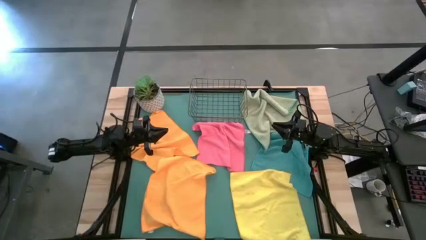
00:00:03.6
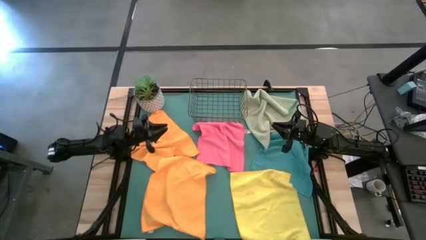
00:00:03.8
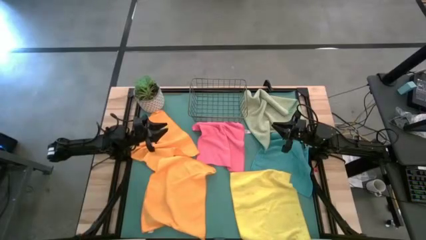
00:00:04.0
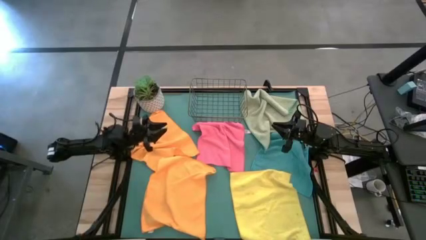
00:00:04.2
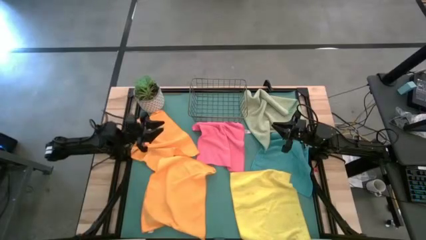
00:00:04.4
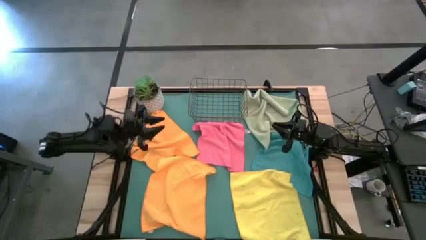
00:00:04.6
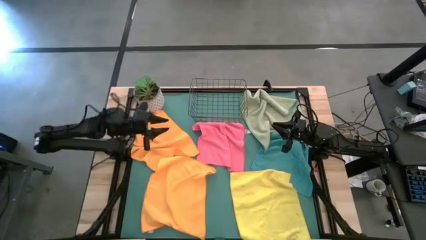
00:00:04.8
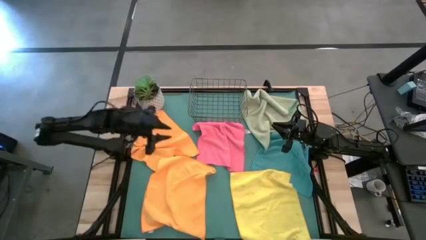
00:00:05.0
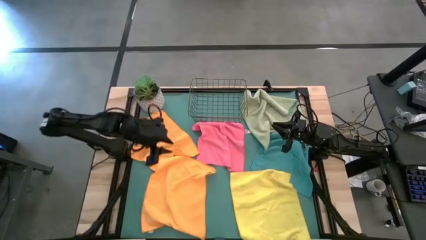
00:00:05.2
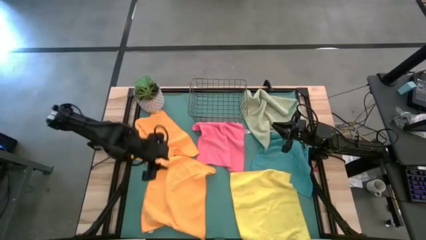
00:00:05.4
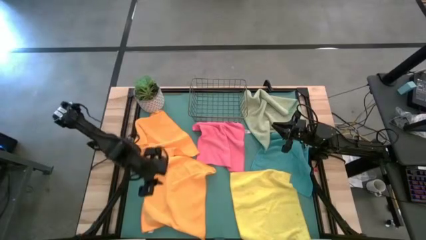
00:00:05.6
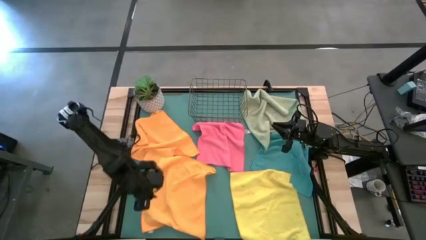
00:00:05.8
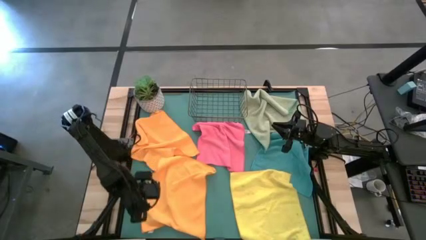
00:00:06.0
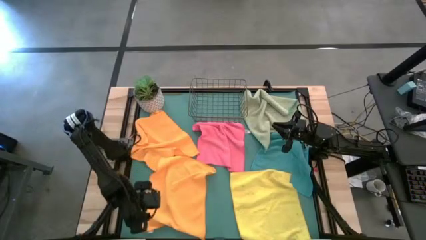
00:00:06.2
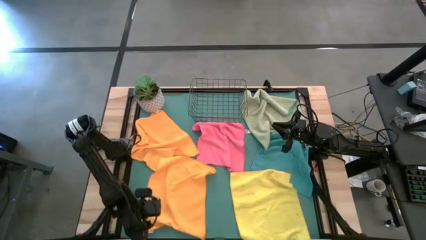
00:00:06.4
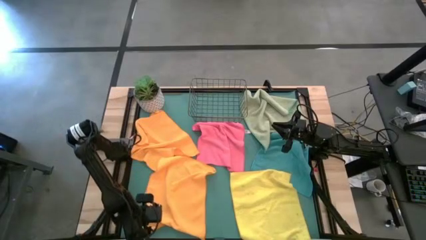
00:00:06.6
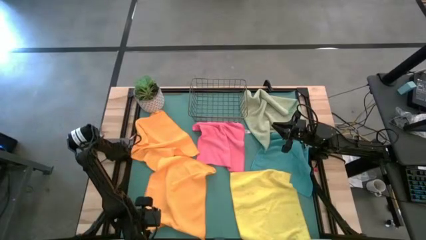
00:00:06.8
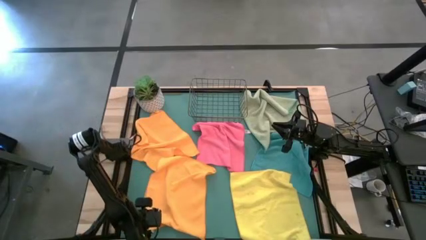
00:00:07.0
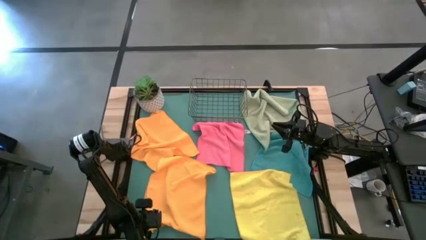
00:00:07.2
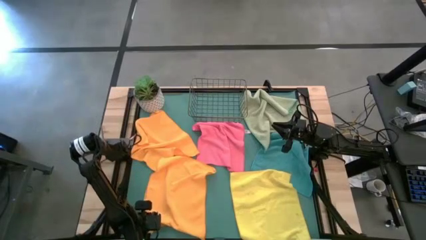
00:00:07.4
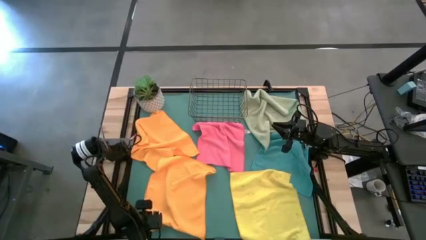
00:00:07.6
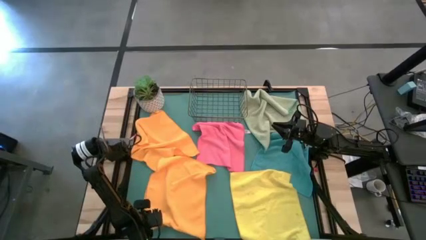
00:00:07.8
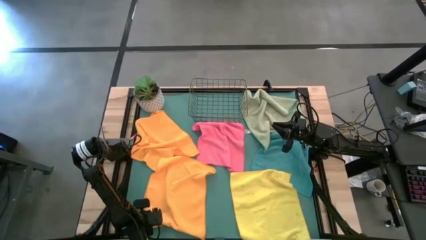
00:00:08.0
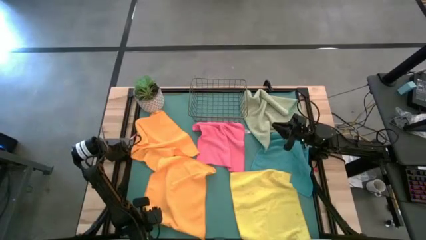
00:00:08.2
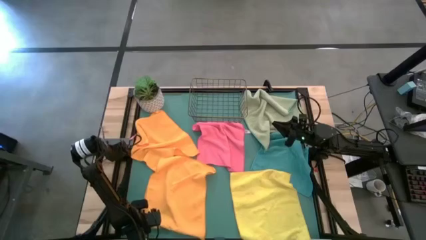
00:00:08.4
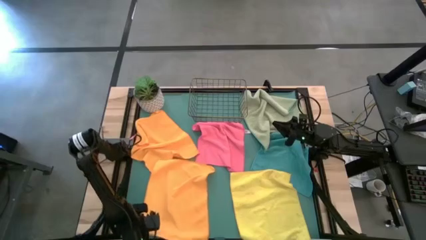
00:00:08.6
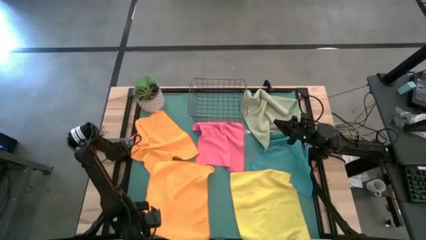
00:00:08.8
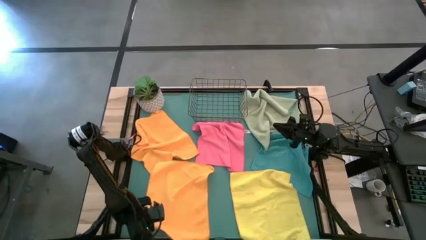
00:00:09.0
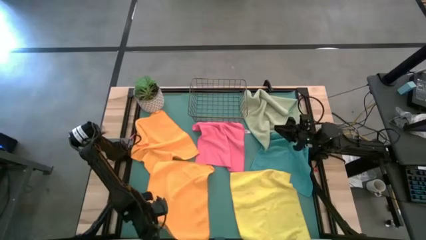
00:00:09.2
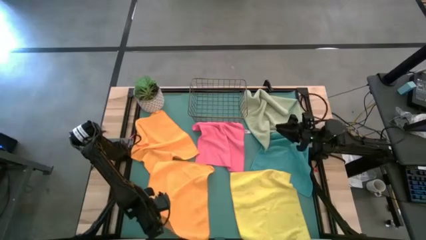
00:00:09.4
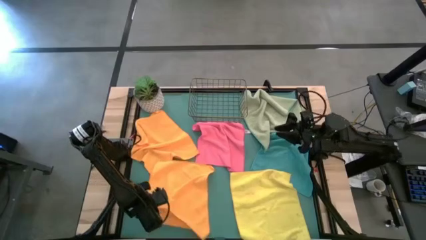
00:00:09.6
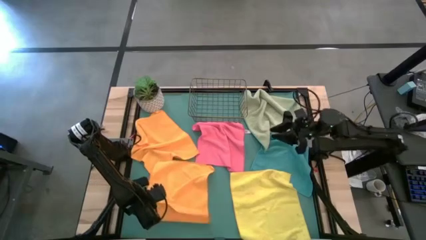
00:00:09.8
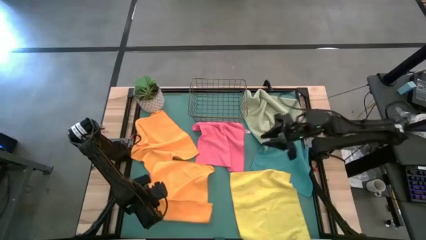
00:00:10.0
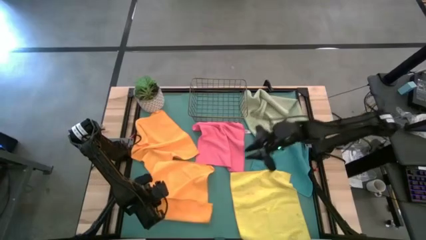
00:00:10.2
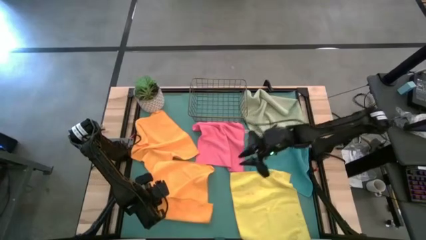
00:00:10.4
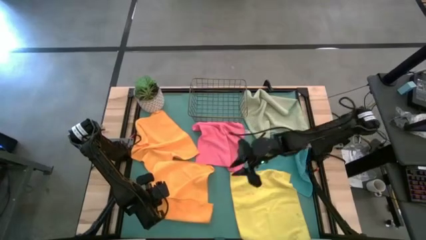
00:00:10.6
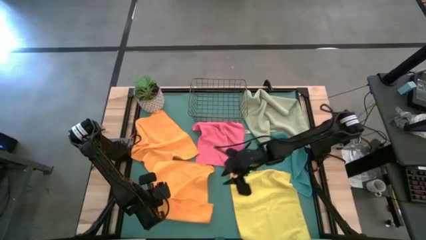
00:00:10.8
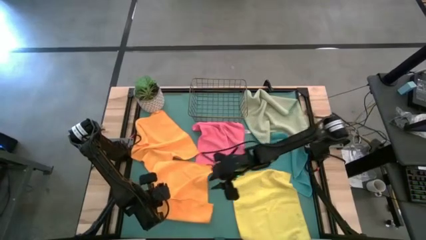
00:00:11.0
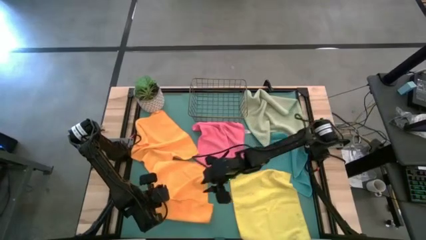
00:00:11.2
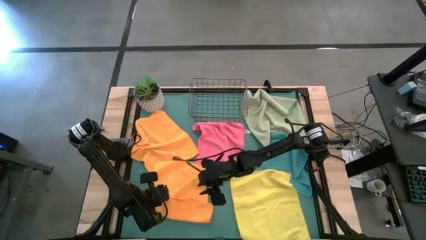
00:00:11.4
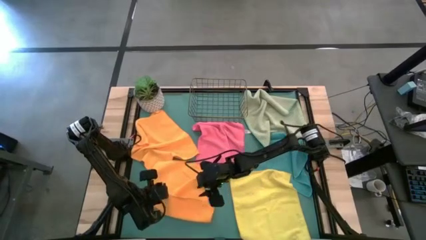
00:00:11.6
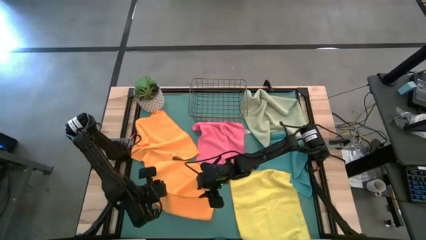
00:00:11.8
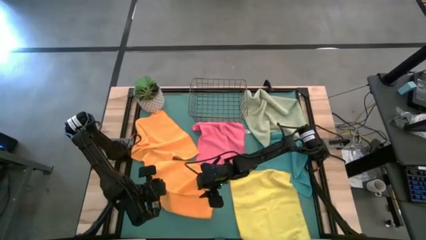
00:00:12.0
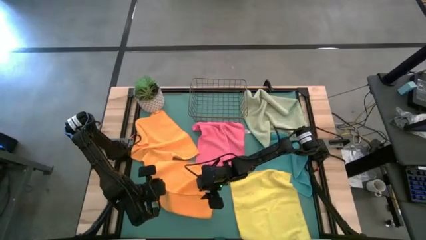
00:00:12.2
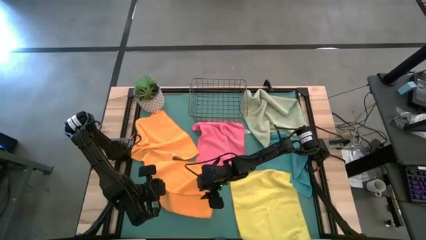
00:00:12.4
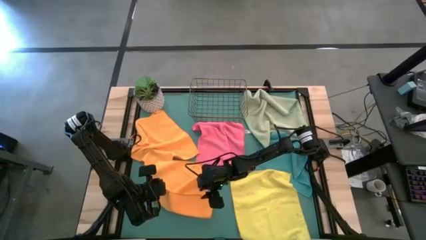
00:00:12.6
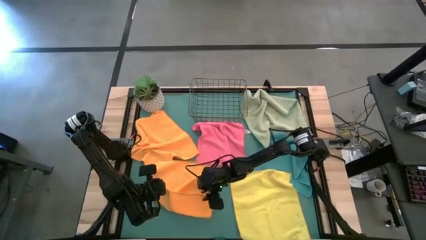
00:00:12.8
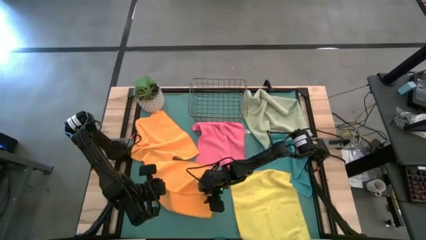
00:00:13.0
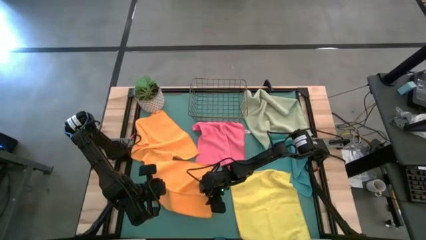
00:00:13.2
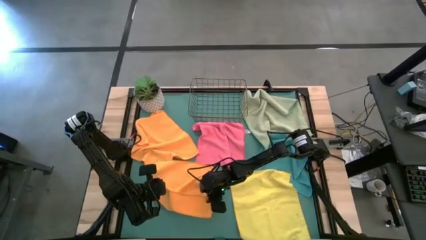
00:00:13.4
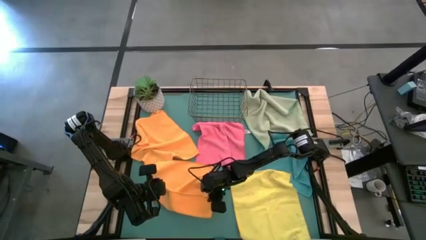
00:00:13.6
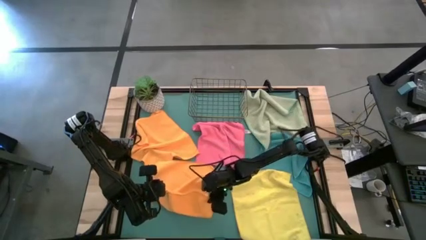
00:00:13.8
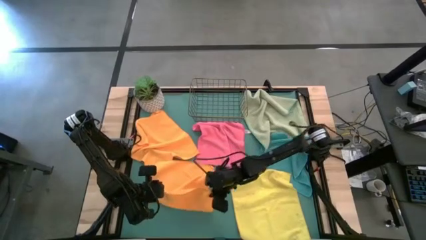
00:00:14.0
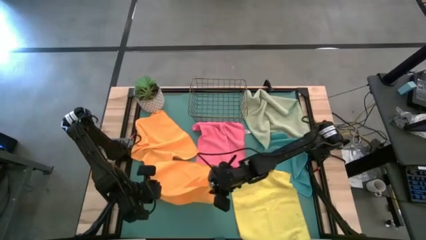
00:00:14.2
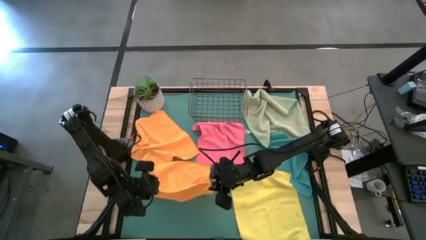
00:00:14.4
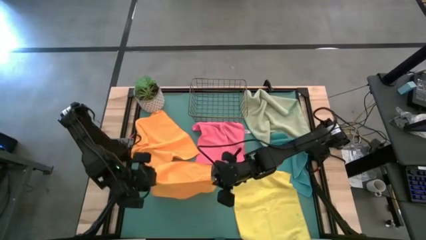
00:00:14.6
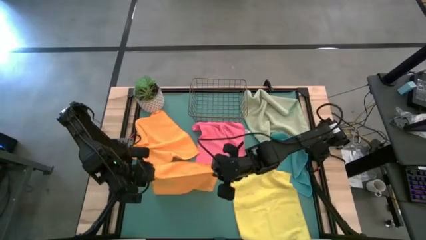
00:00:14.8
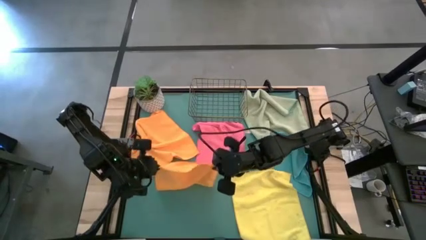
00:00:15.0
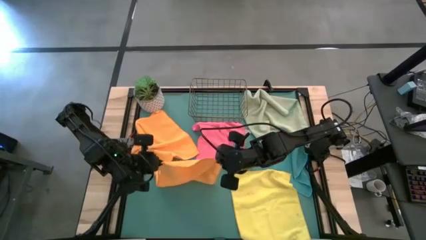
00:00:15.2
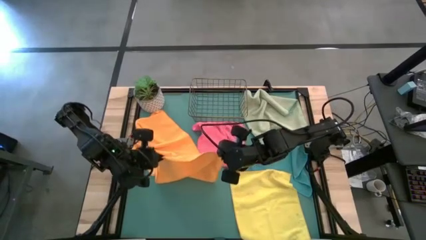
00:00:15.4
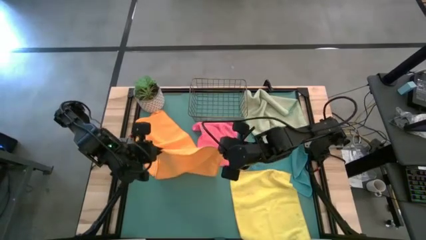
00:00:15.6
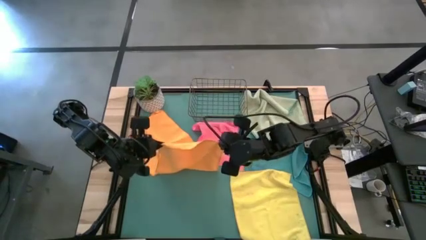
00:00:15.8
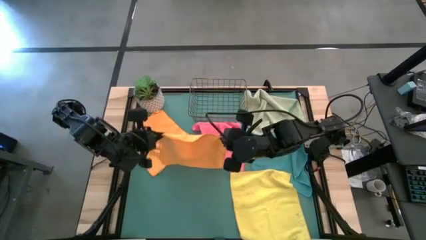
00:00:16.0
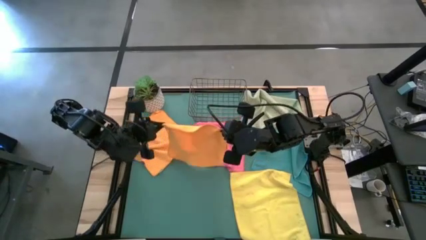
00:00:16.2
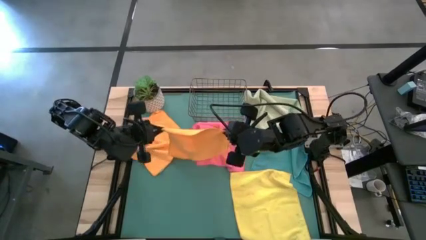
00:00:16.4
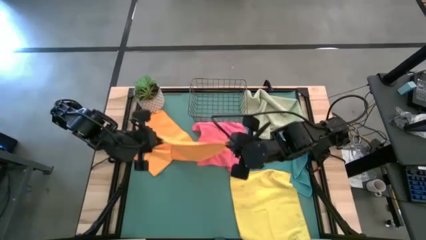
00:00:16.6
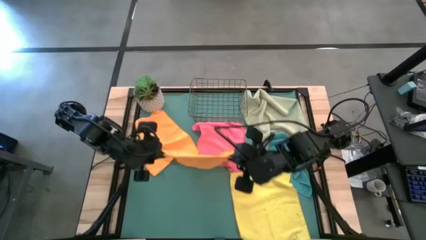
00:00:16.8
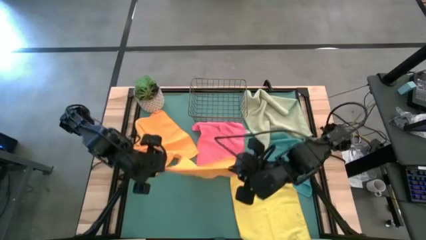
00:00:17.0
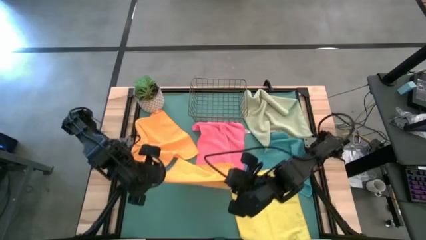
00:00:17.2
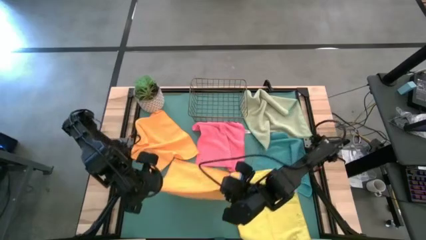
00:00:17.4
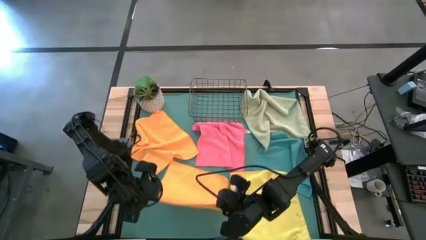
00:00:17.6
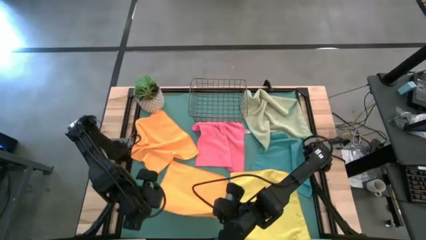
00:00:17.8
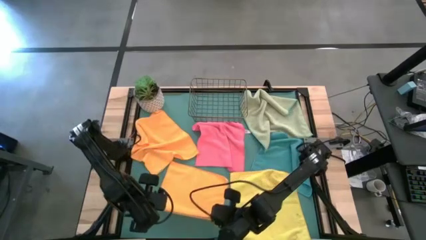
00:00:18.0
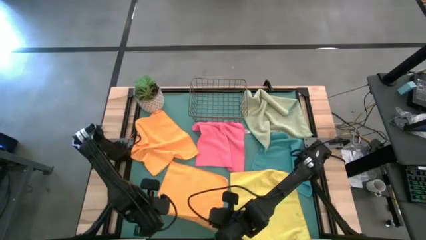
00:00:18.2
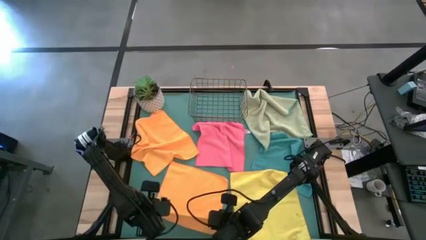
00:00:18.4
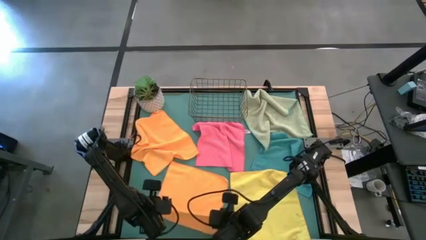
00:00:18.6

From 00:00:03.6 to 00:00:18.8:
Task: Fold microfiber towels
Fold the bottom orange microfiber towel
